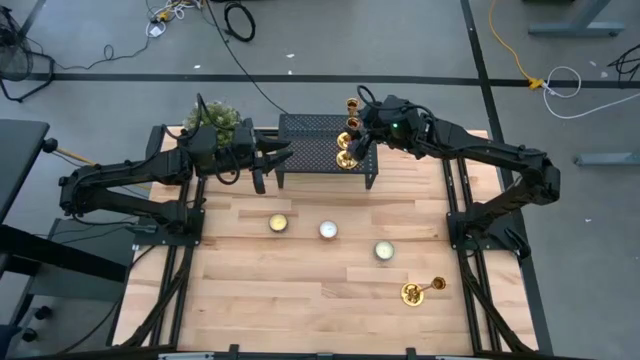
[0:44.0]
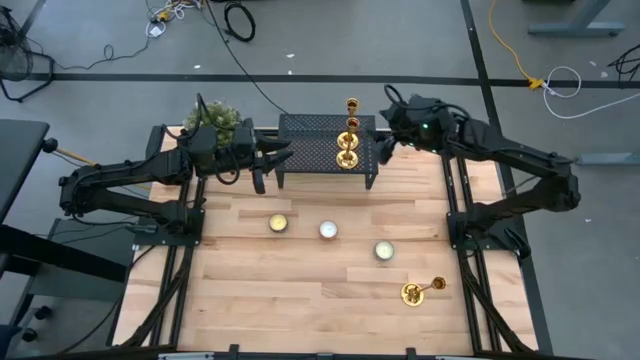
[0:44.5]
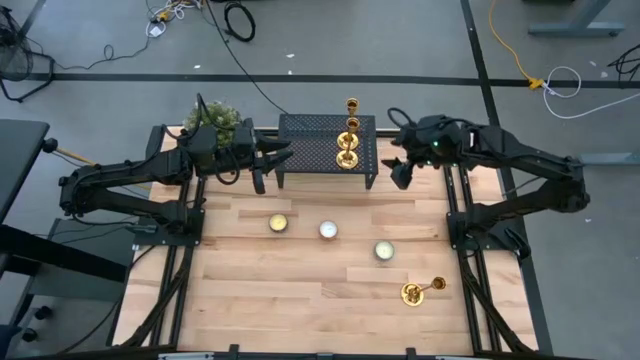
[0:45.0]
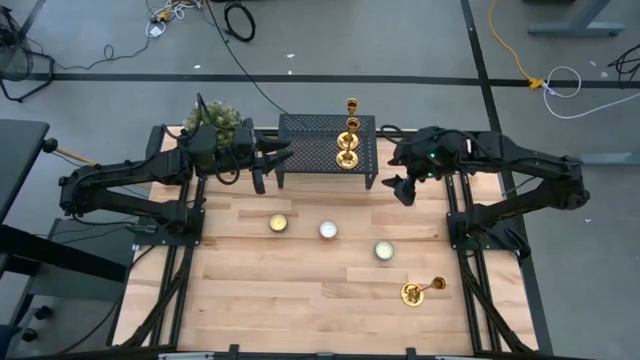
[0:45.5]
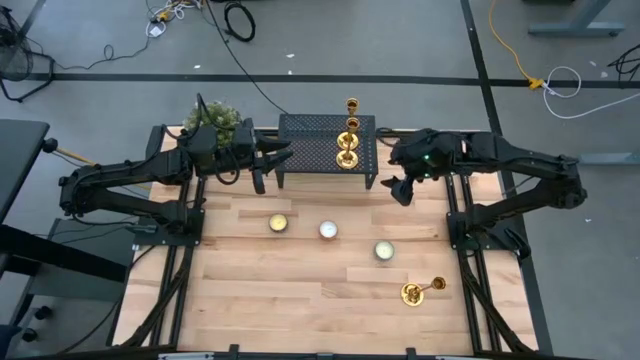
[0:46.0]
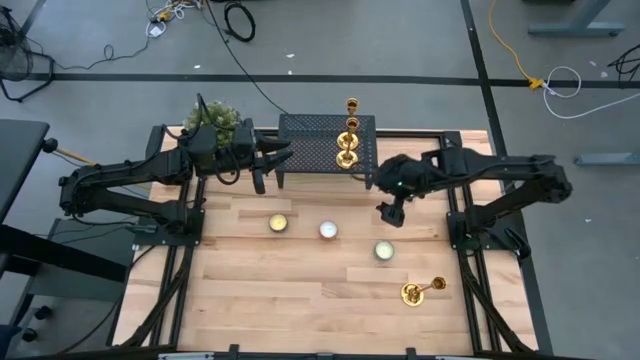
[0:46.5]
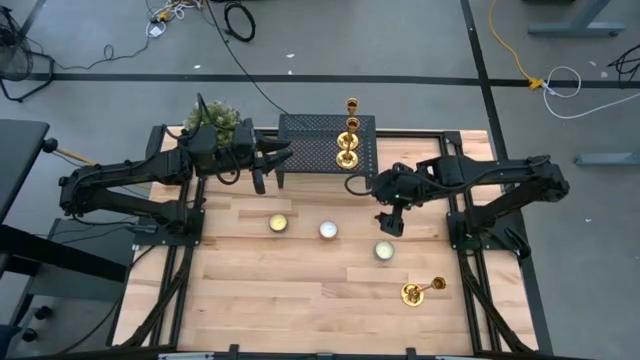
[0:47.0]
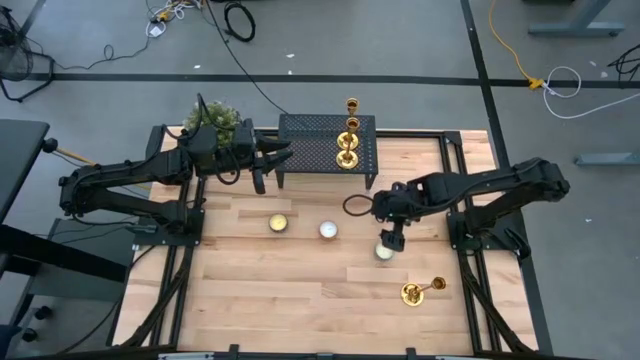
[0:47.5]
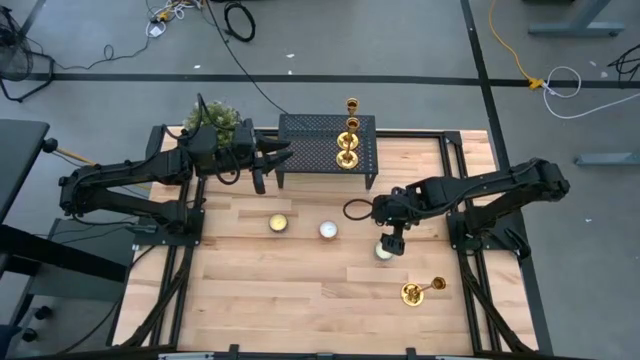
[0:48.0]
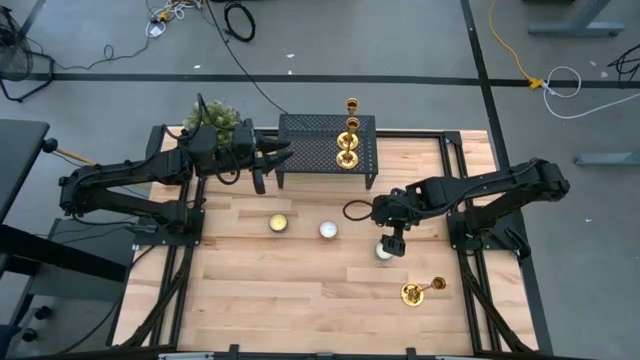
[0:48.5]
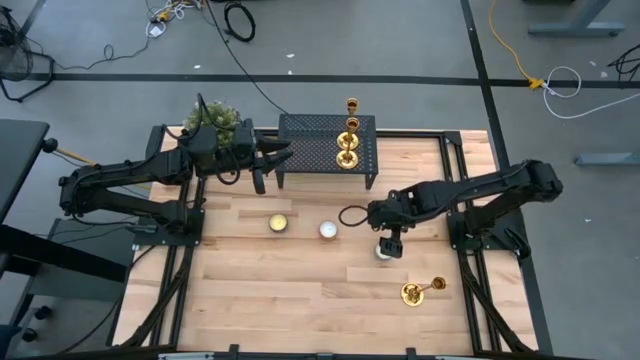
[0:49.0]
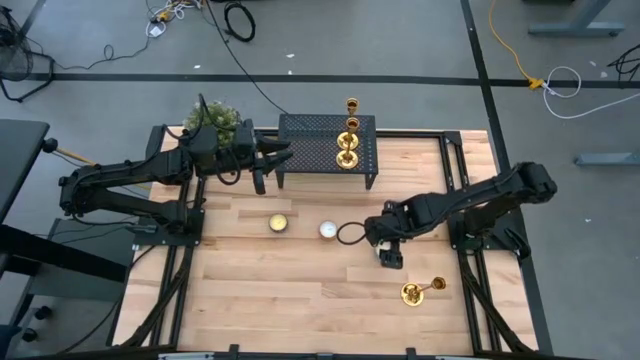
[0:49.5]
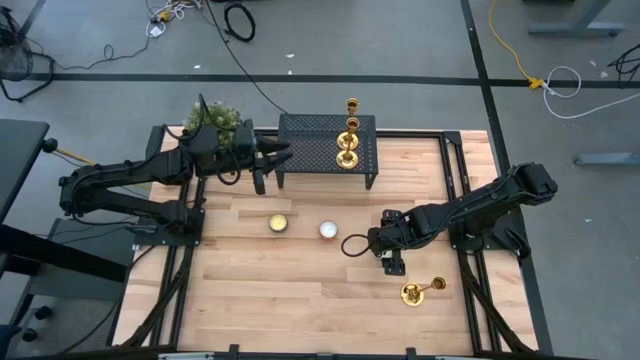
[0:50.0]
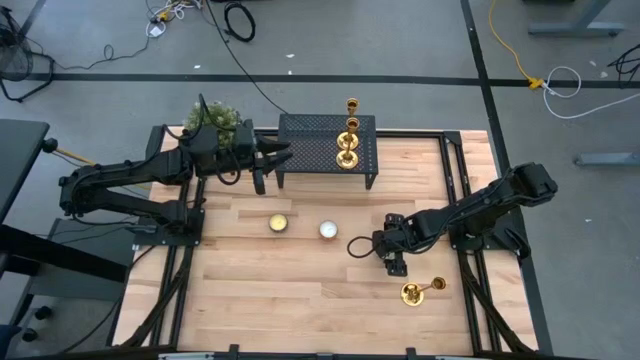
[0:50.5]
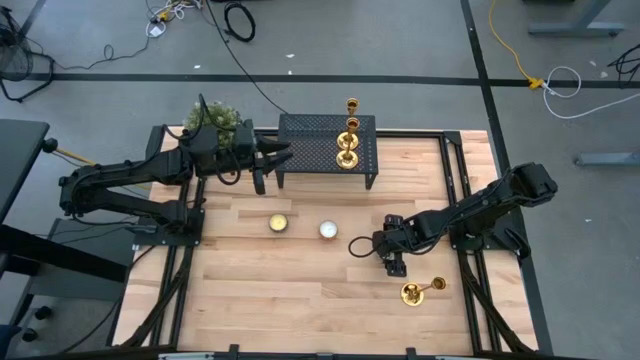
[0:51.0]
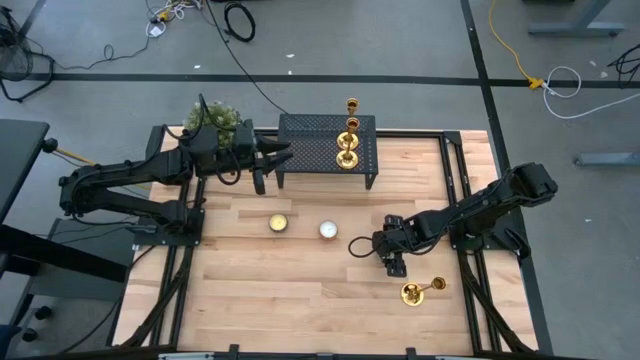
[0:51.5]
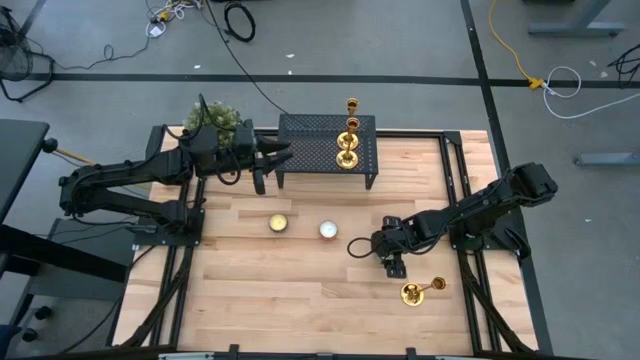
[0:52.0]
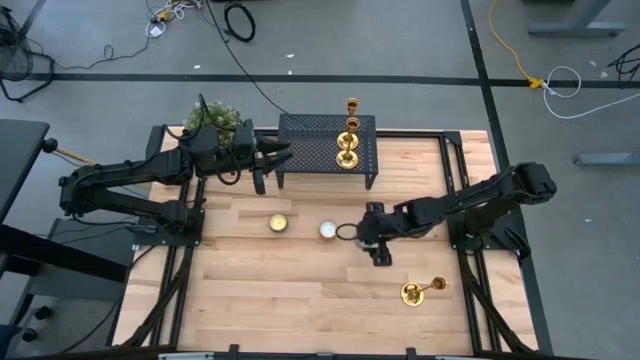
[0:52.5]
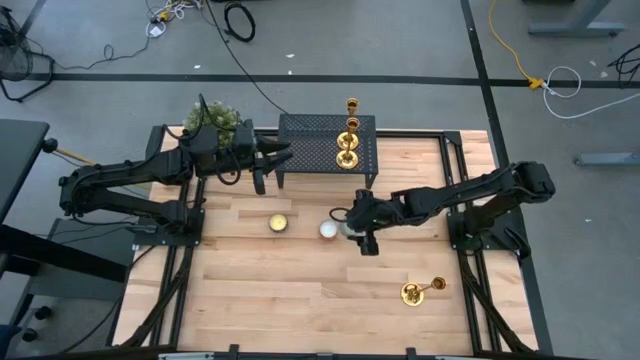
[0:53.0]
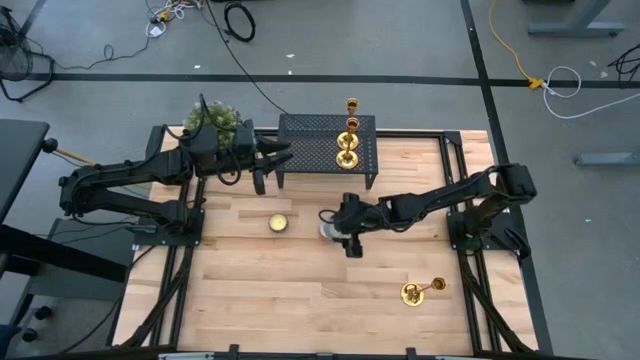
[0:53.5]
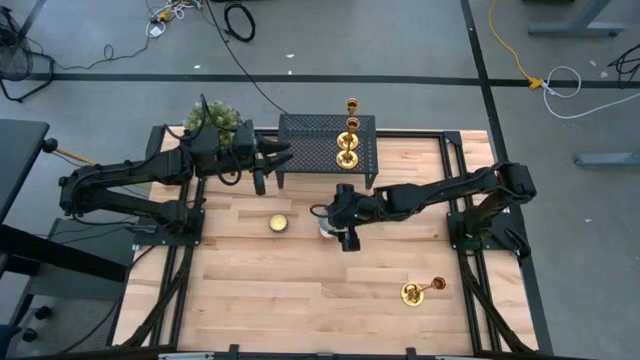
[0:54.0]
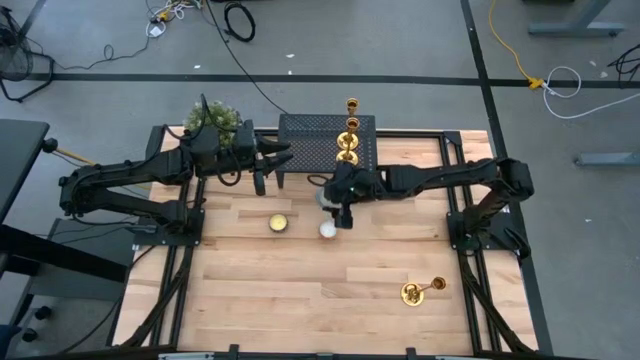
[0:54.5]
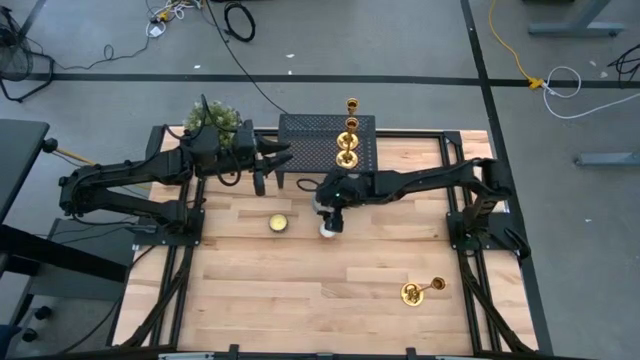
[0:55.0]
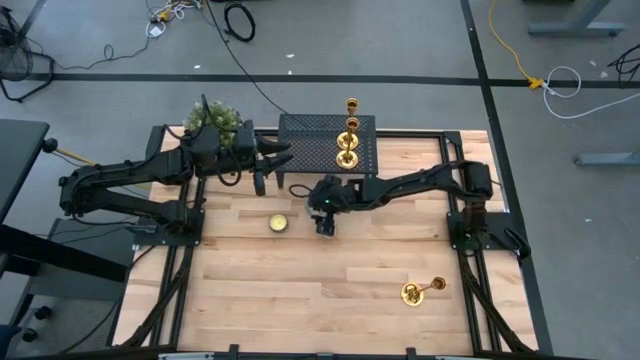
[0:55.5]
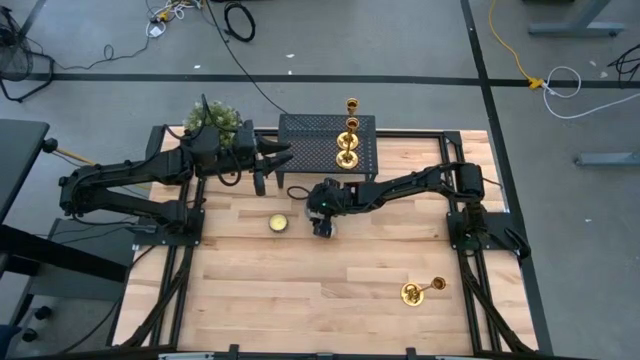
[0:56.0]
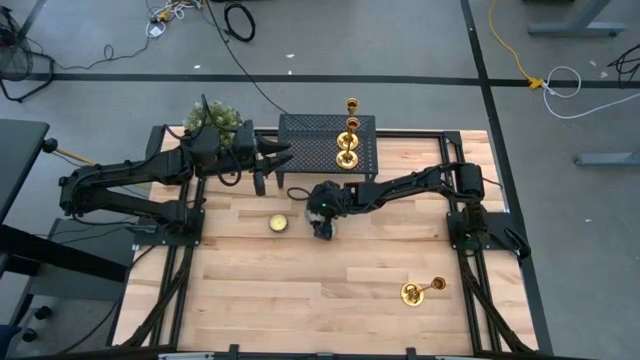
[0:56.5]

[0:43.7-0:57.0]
Task: Pick & Place candle stick holders
Move the patterned blue scented candle to the middle left of the table

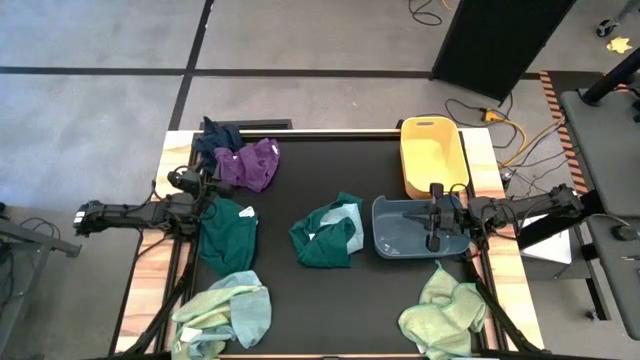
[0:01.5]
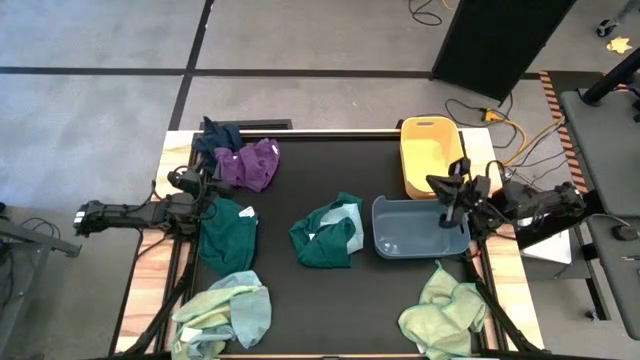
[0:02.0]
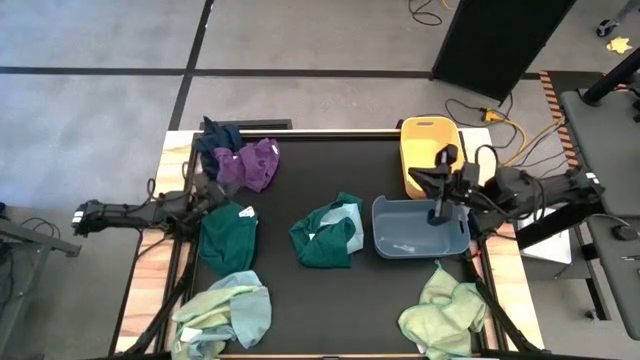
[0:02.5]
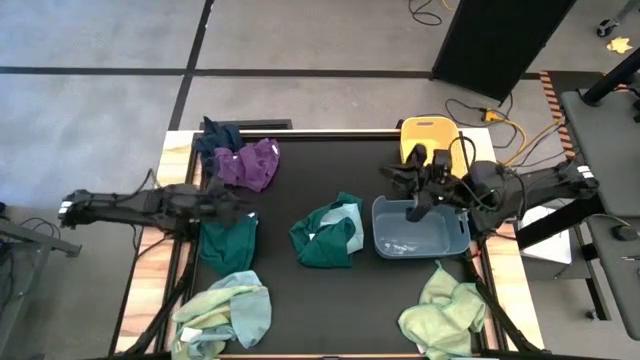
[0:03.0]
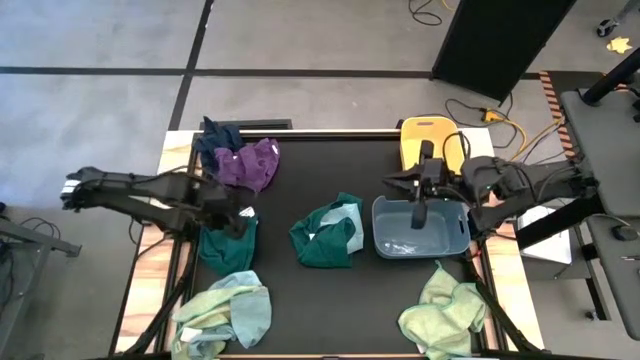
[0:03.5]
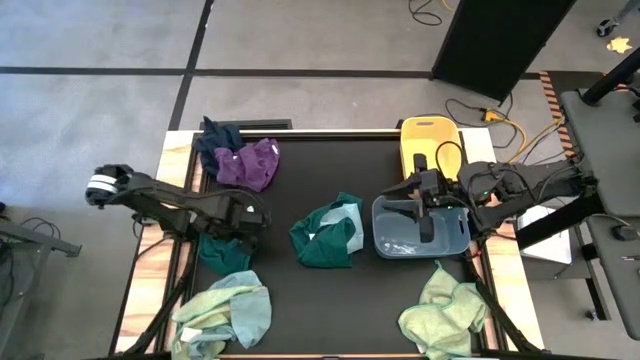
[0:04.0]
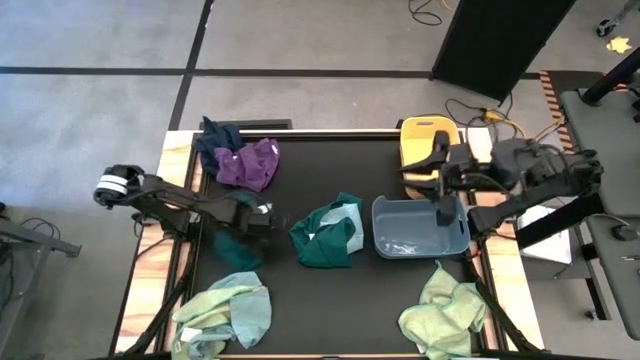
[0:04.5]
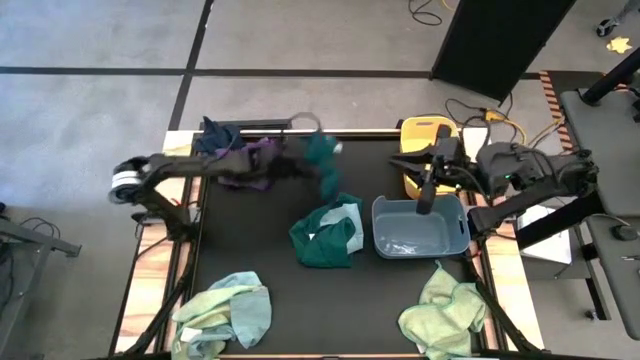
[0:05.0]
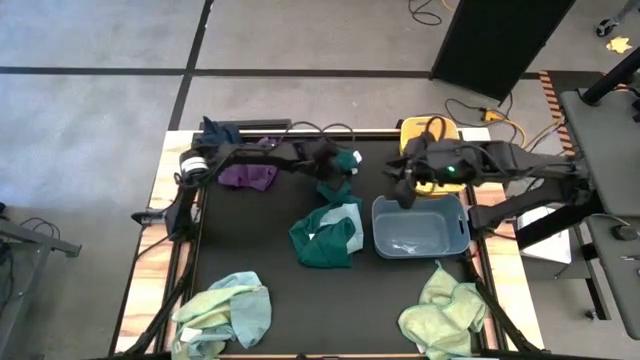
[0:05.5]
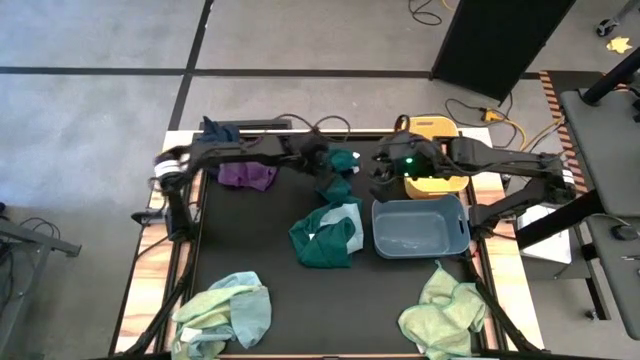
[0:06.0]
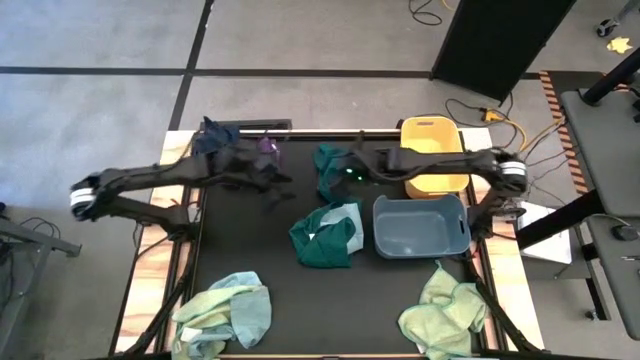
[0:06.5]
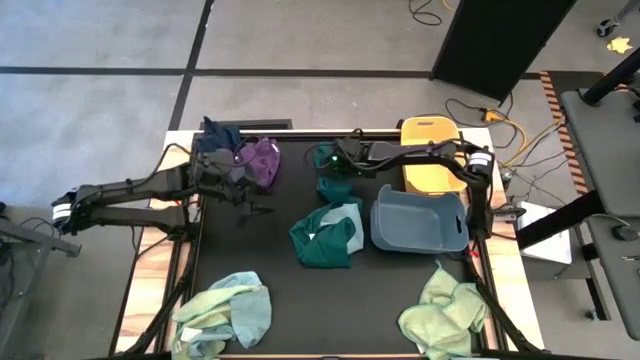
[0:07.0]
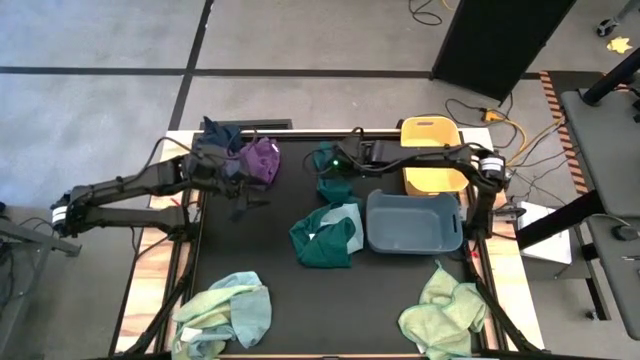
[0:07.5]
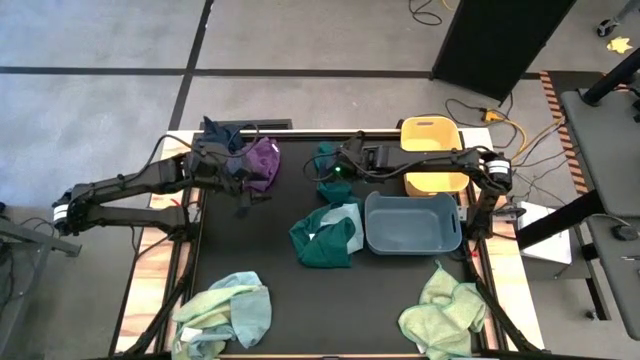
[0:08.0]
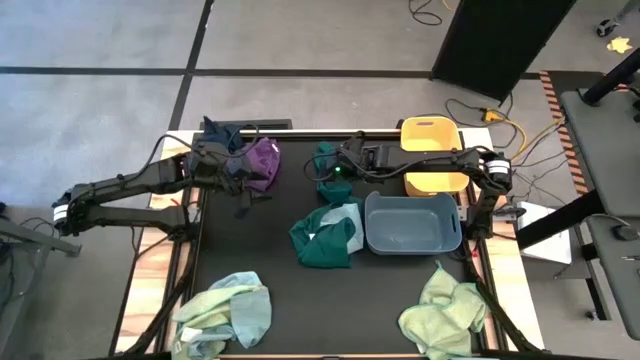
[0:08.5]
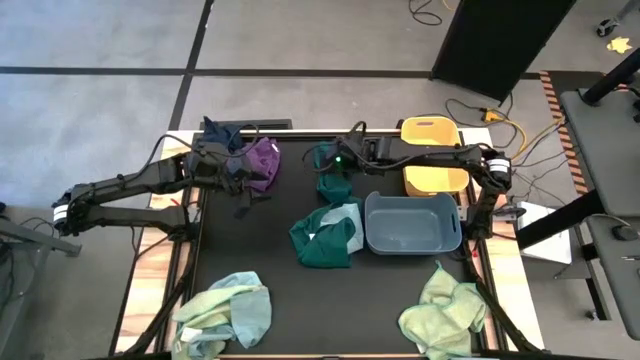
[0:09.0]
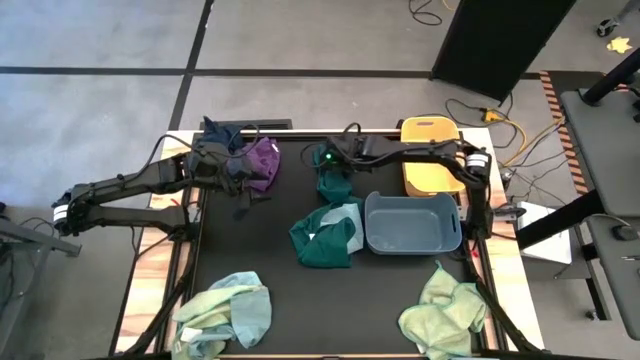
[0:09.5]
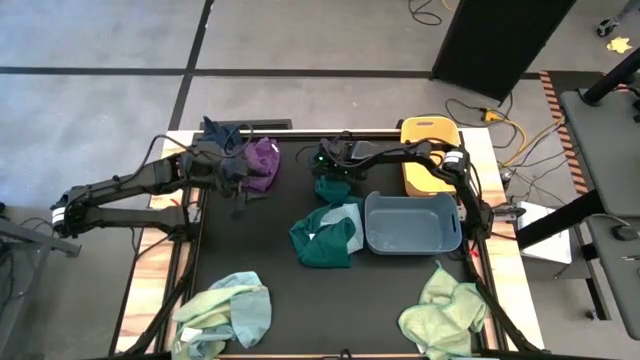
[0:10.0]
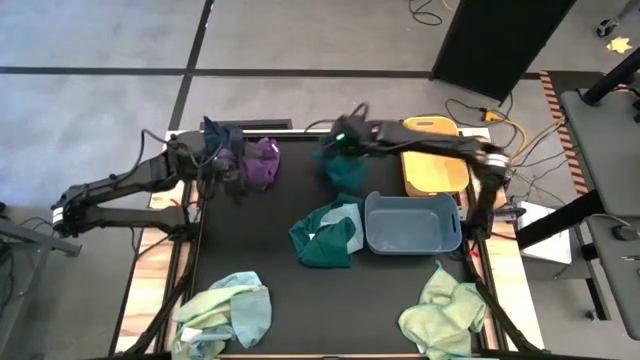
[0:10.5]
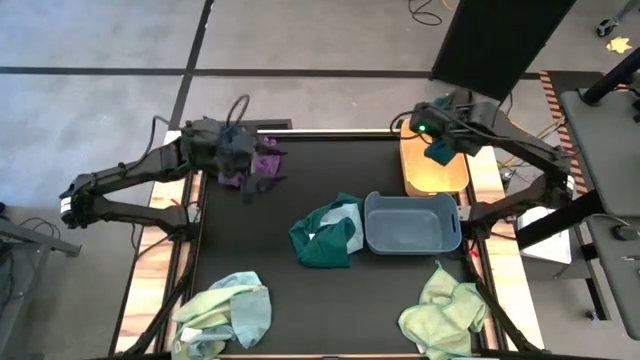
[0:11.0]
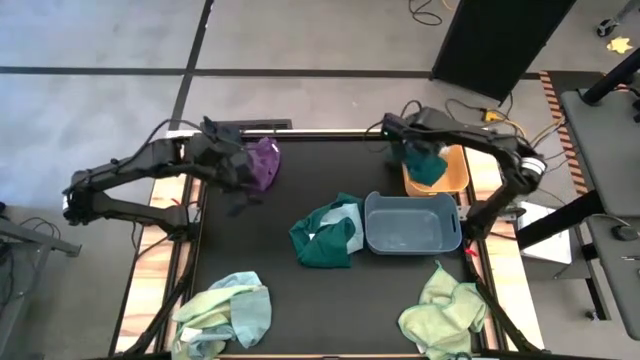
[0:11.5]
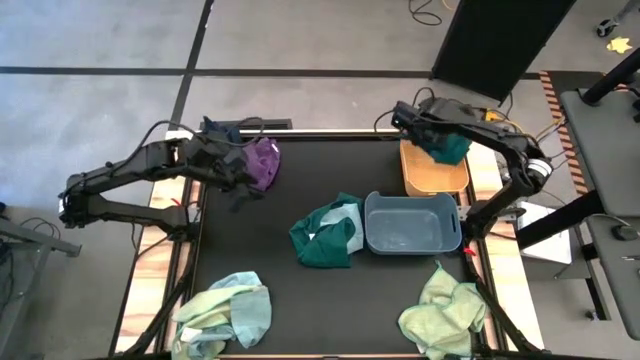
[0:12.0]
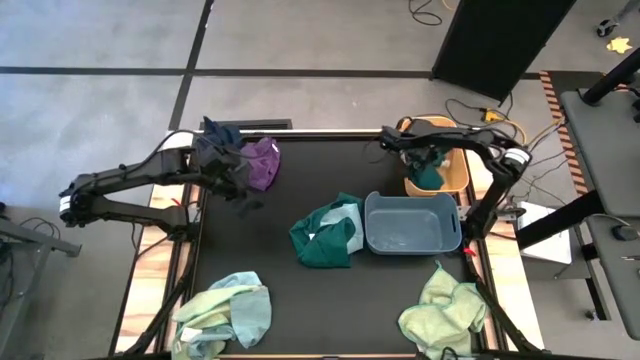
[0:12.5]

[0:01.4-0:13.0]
Task: Sort towels by color in basket
Put the left green towel into the yellow bin
